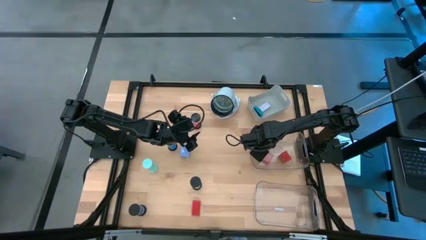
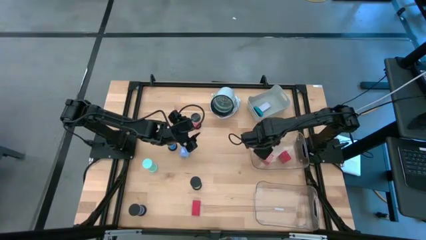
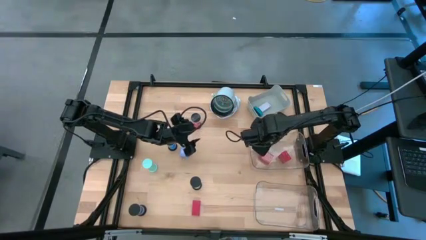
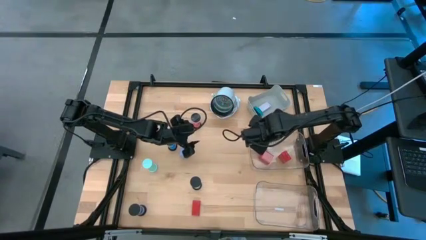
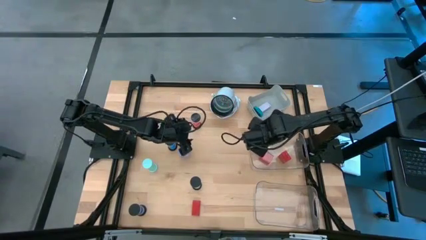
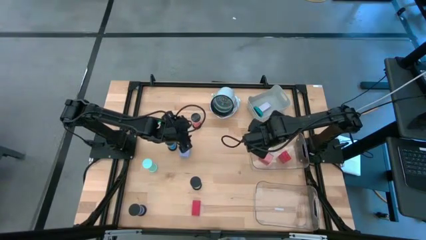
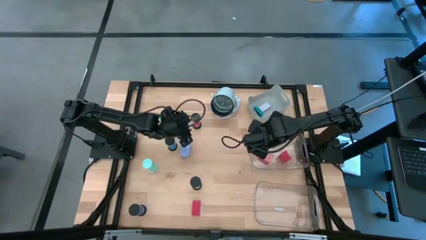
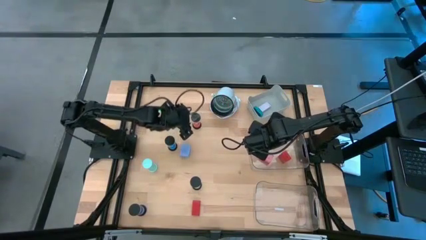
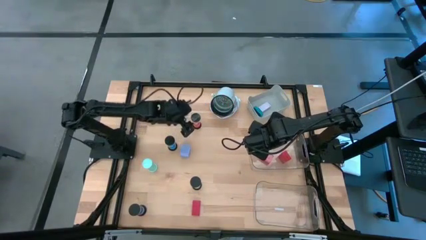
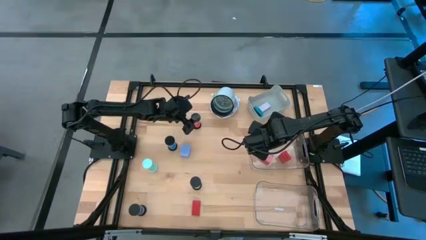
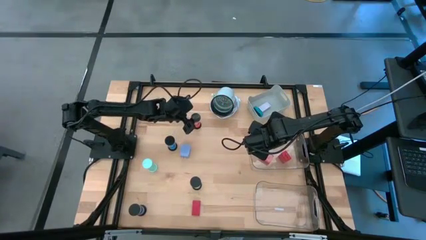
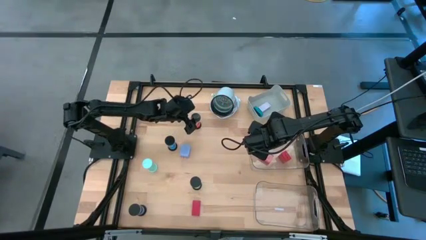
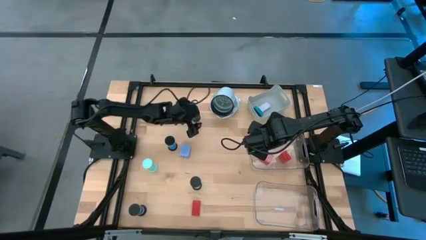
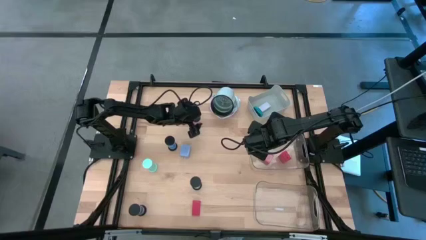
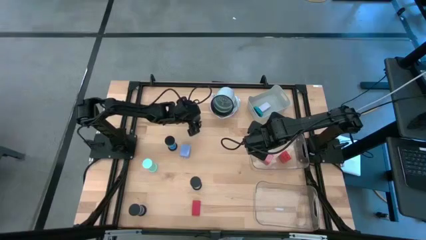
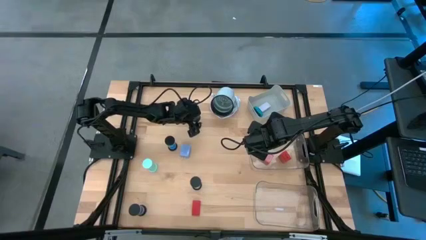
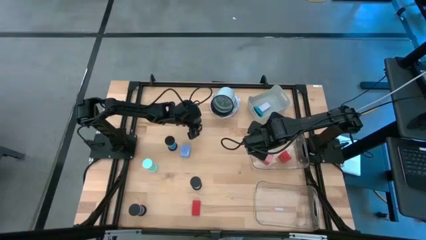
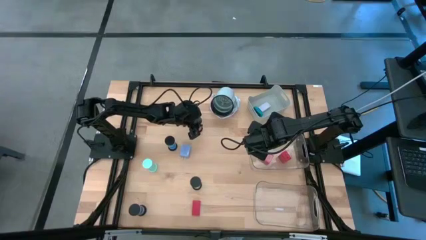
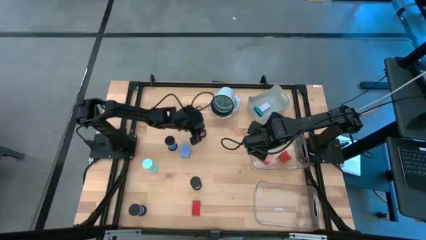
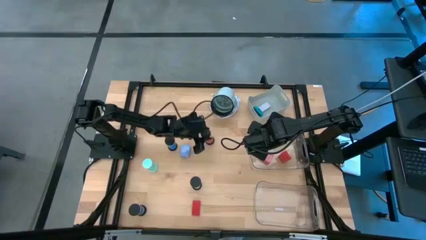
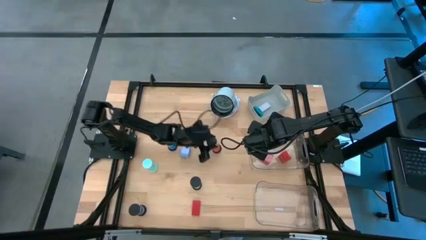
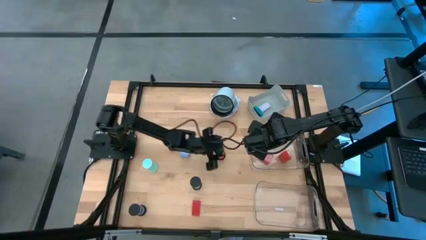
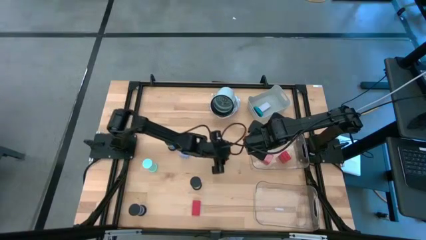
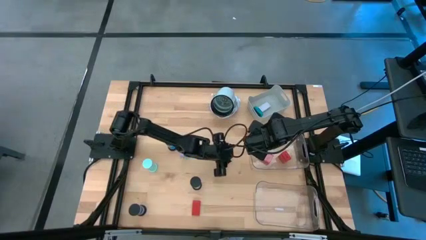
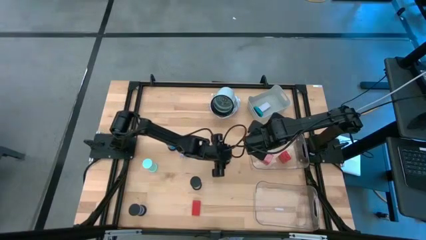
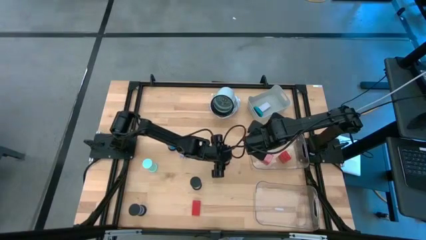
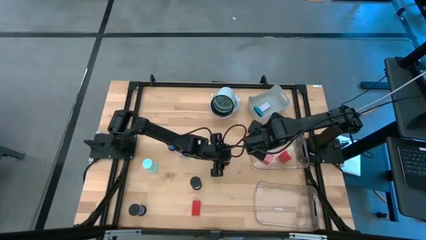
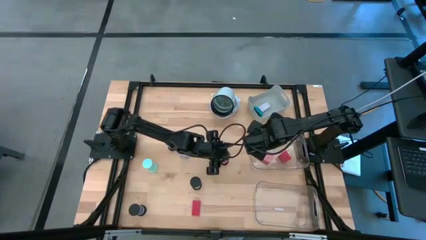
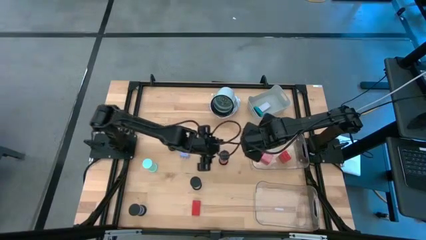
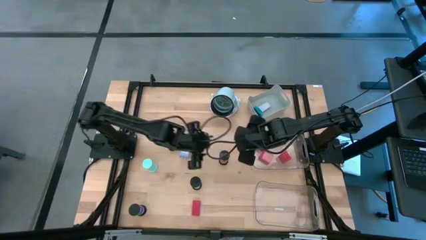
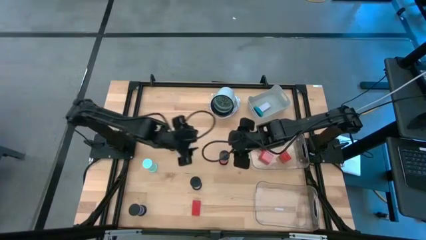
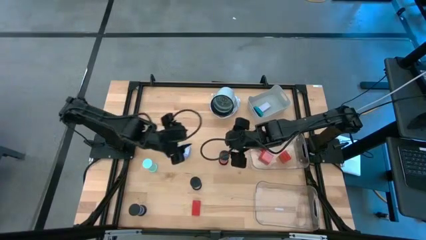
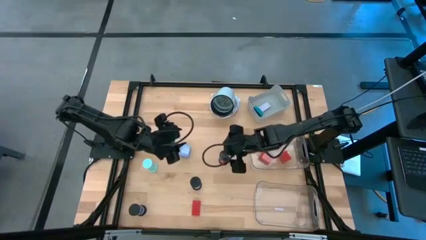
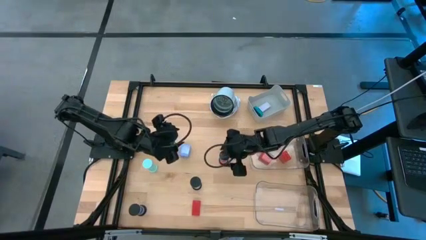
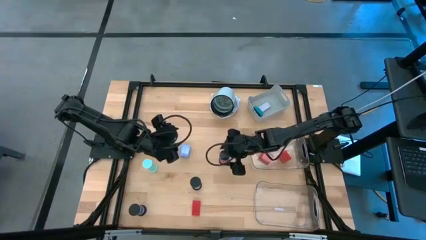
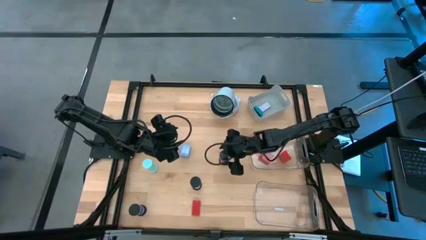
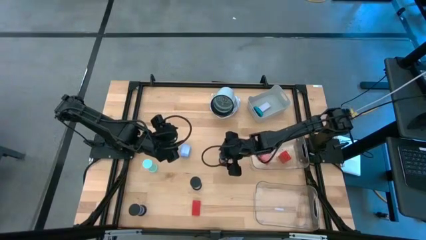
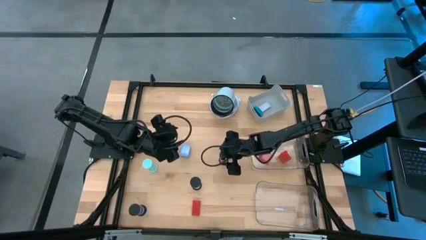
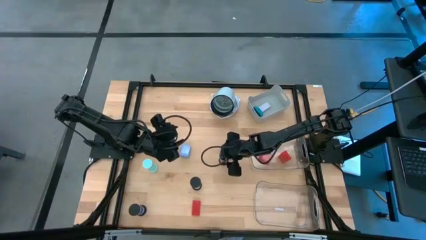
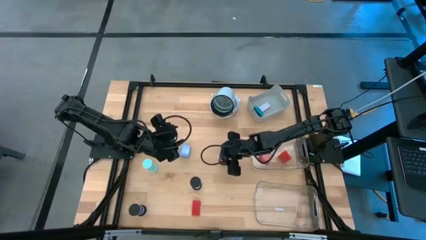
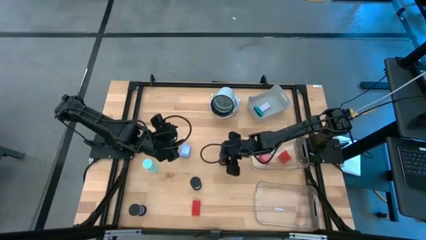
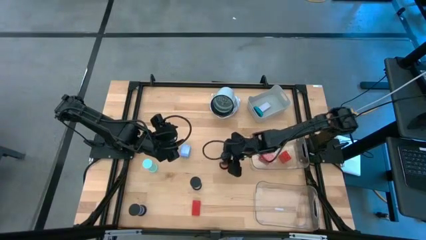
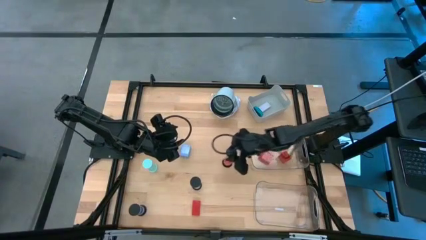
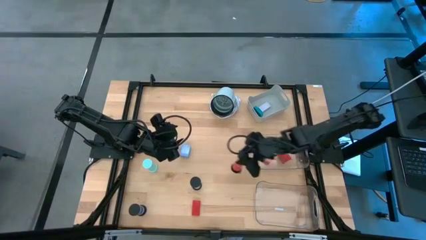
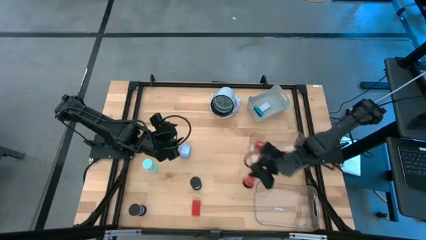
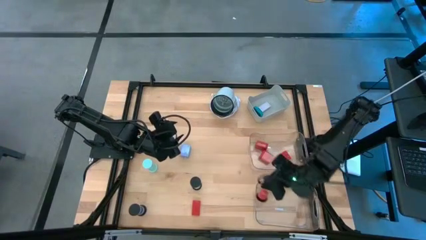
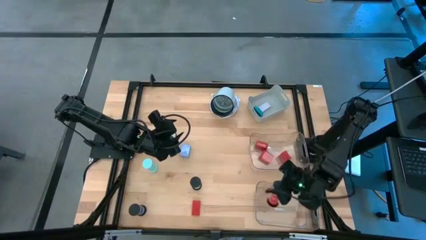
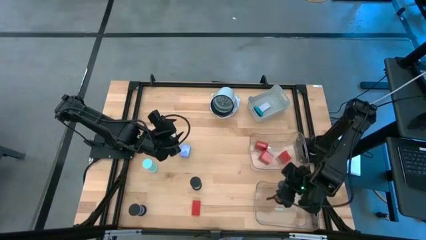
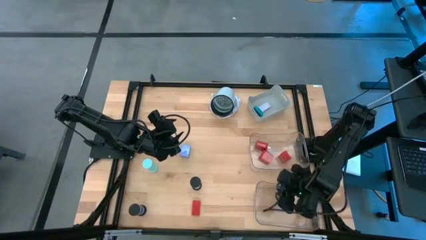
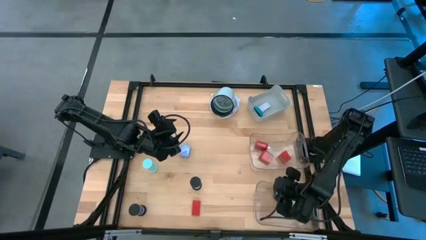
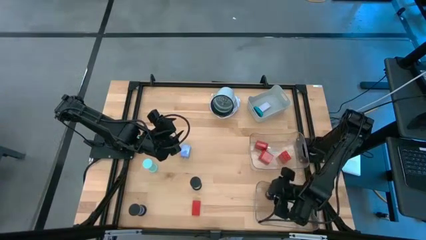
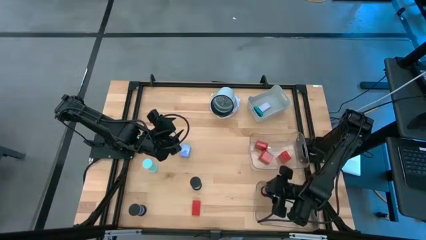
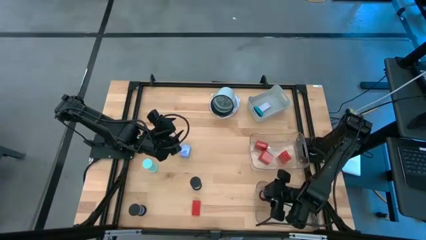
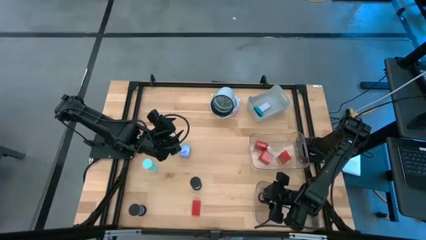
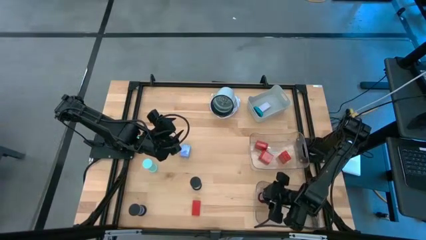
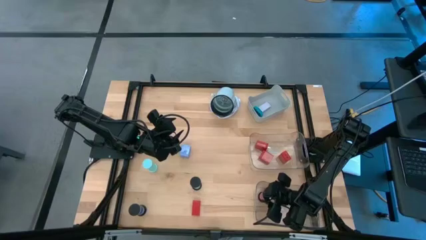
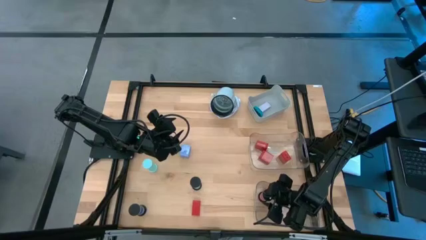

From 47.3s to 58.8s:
Task: Pick & Place Office items
Put the red hourglass into the bottom transparent bin
